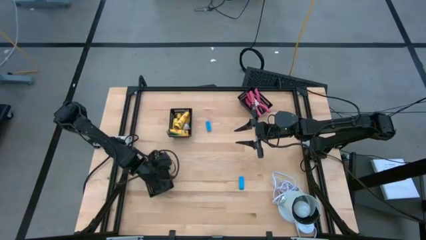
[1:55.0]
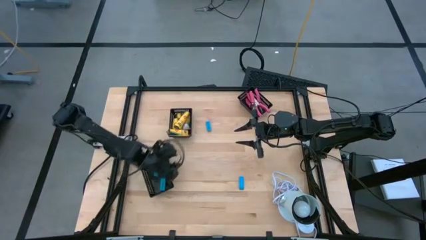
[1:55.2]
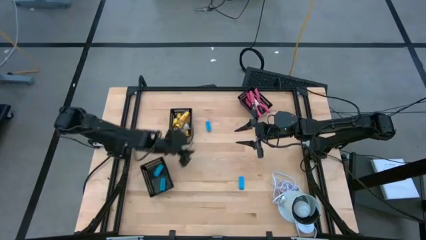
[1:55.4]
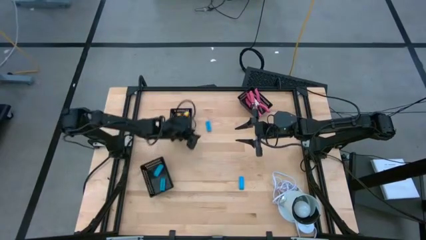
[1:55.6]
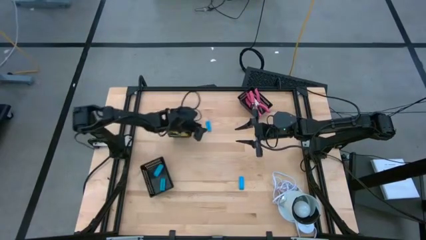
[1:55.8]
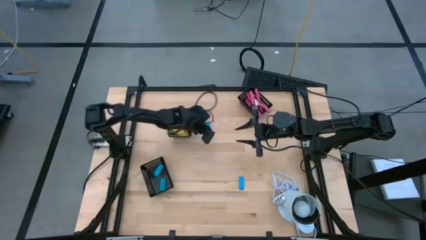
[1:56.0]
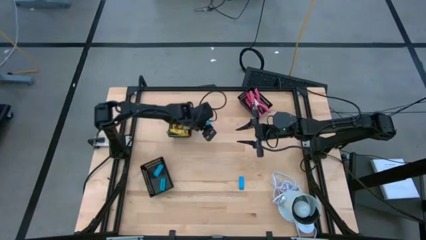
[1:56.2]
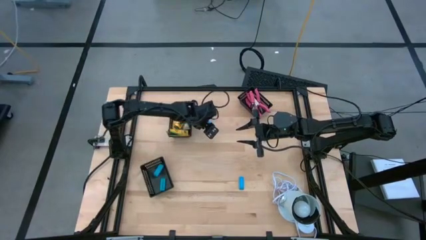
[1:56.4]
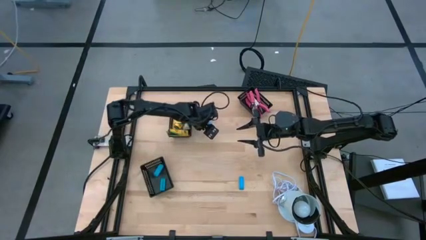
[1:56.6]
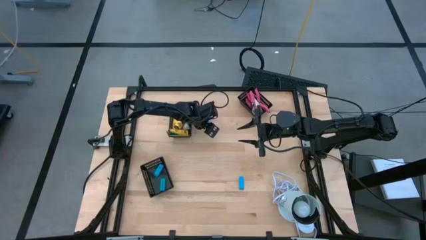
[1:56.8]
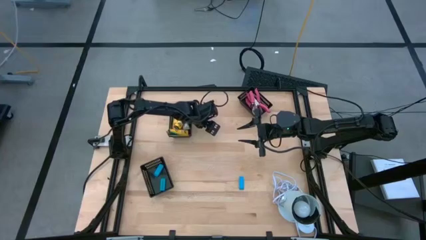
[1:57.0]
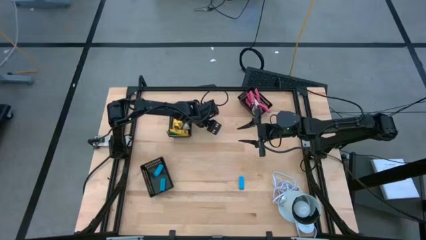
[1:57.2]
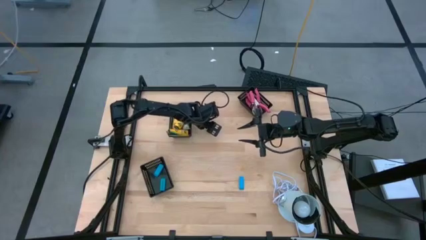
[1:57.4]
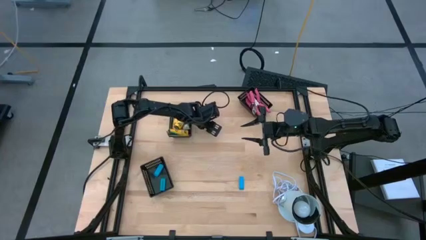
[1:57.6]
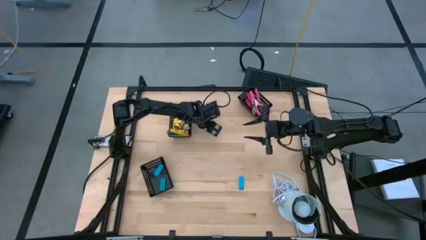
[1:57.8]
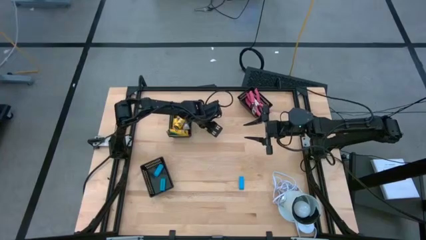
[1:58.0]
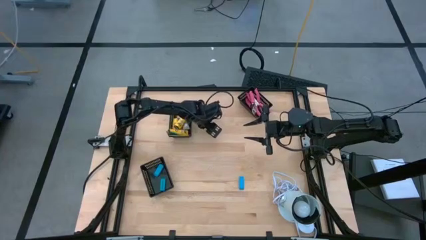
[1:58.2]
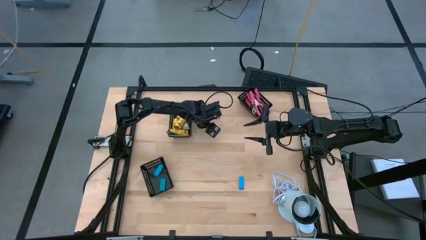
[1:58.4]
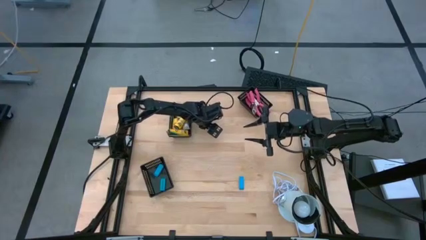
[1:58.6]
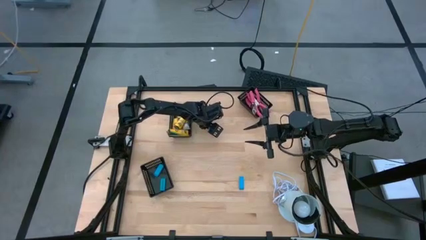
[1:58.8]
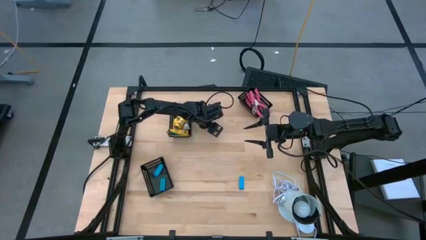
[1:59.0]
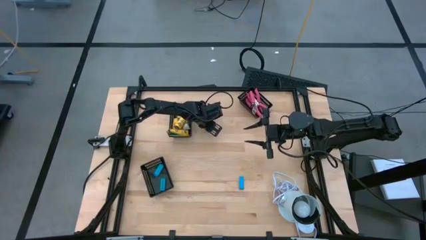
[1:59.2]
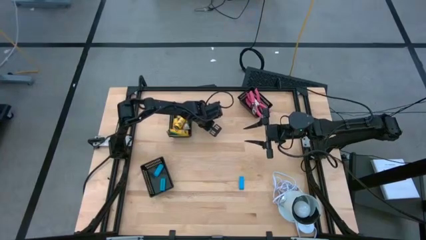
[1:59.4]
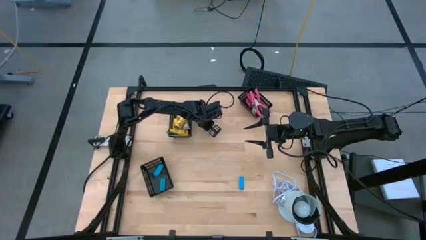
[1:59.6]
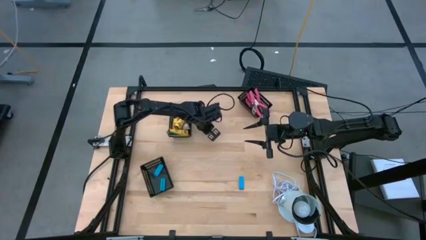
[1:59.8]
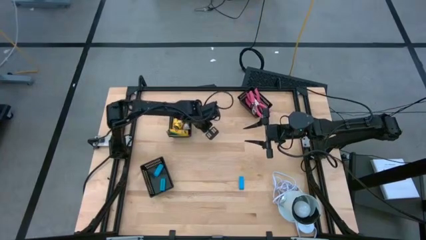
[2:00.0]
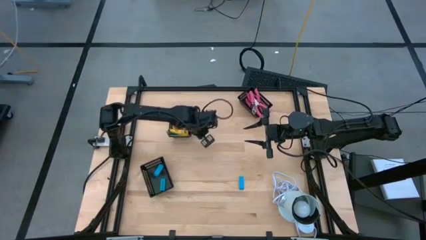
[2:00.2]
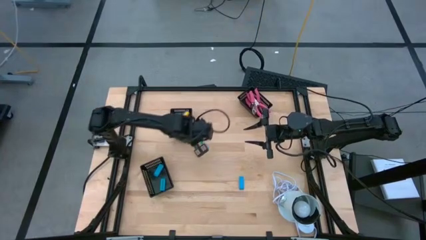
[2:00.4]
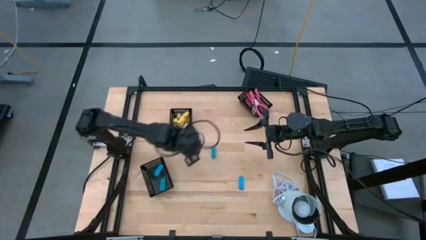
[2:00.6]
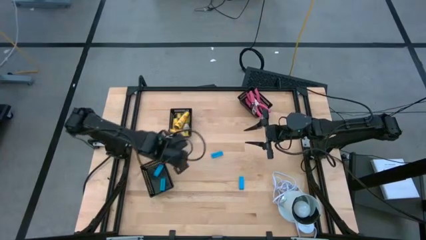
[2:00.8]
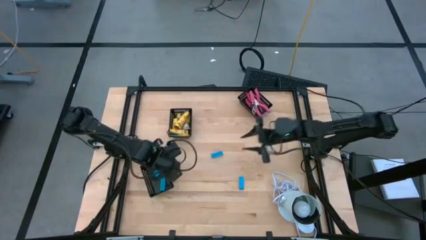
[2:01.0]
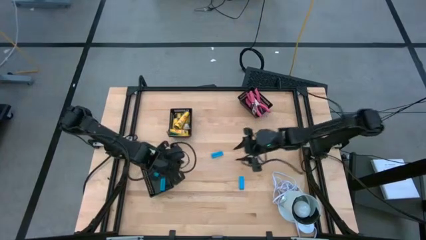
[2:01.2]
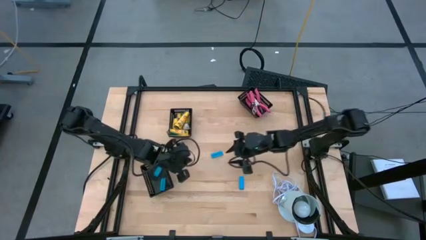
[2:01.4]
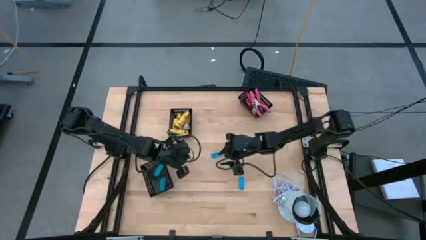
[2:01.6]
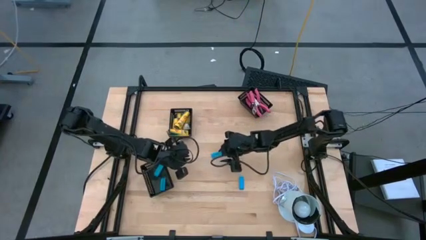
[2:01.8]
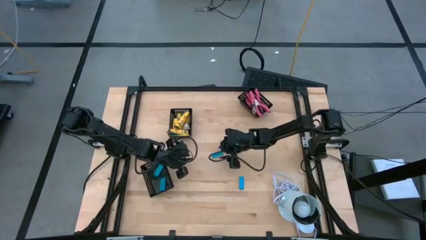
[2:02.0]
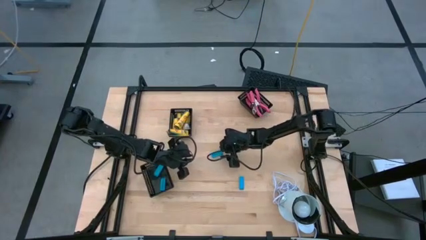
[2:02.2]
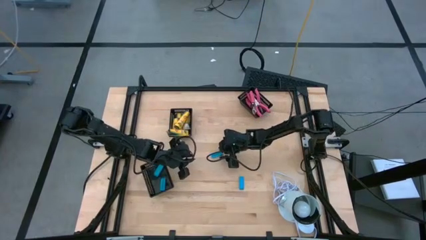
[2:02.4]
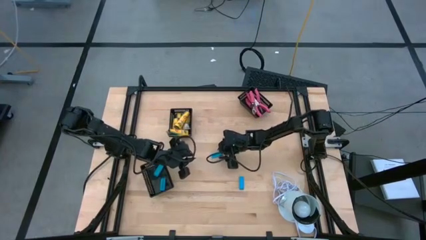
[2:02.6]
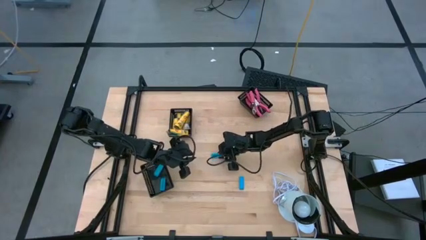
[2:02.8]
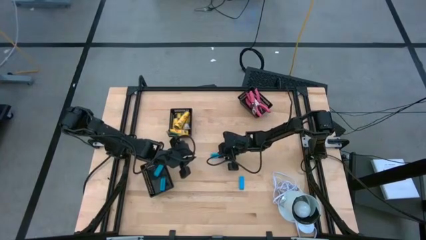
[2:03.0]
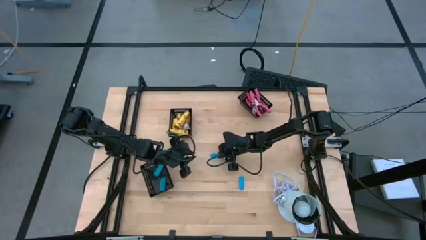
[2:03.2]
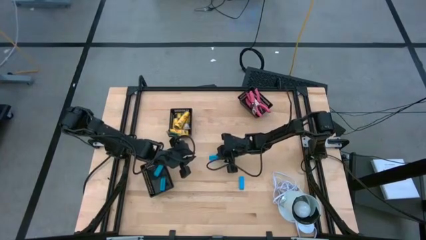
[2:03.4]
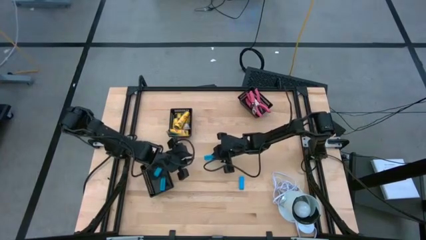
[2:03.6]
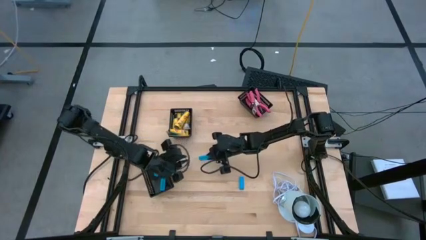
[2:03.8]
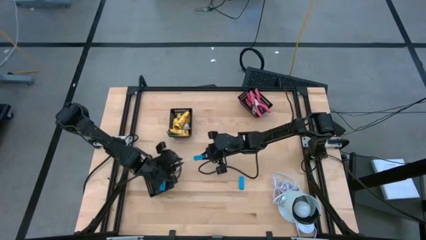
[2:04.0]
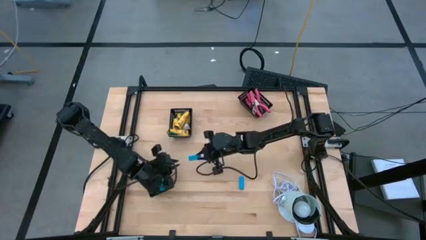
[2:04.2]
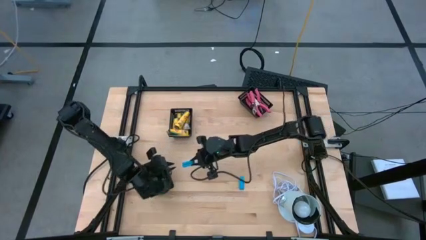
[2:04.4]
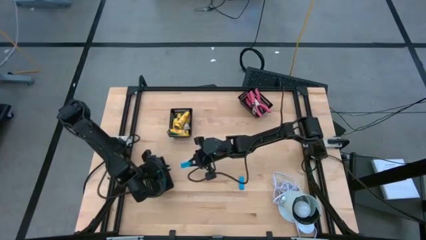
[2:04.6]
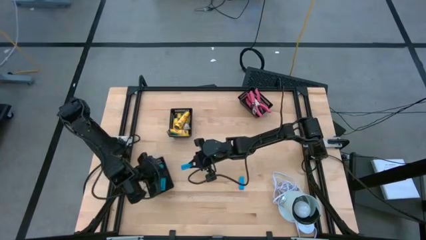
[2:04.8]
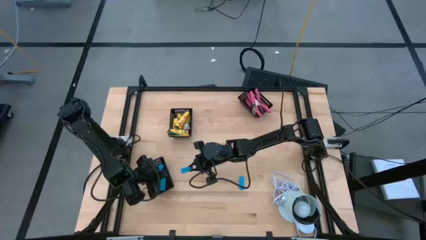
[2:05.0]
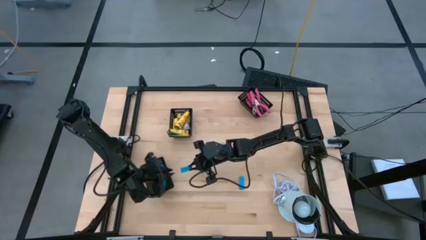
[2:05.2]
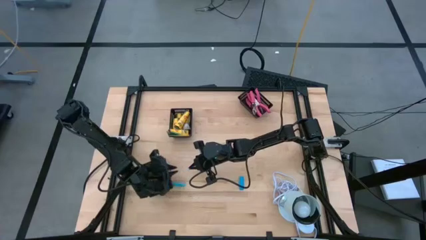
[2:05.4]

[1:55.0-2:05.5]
Task: Pick & Place School Supplies
Put the blue eraser into the bottom black bin

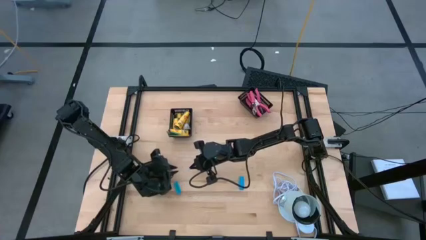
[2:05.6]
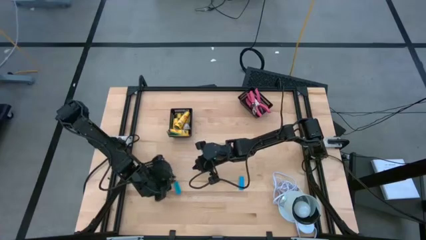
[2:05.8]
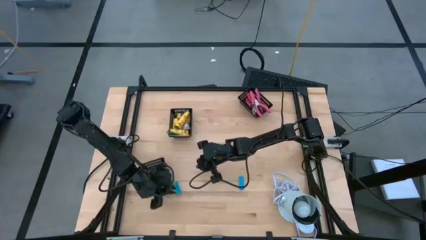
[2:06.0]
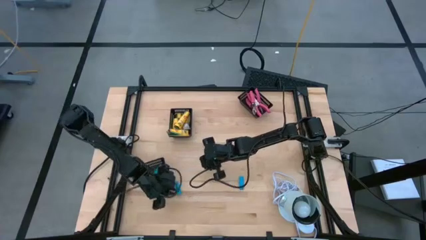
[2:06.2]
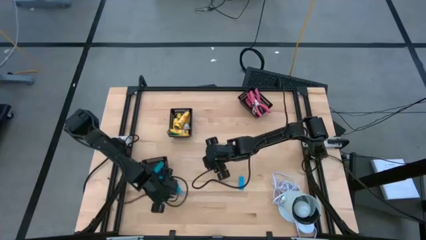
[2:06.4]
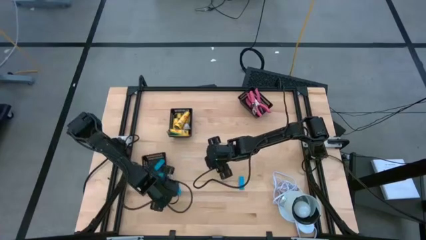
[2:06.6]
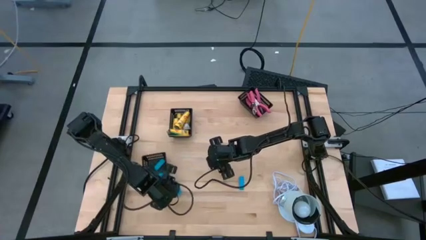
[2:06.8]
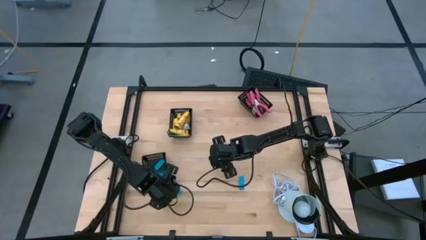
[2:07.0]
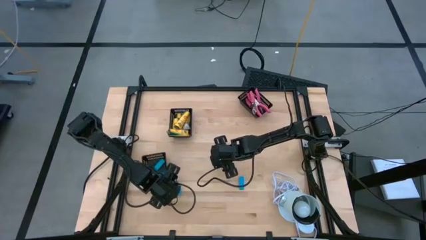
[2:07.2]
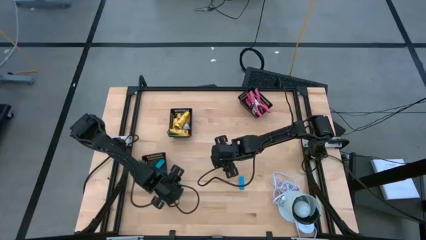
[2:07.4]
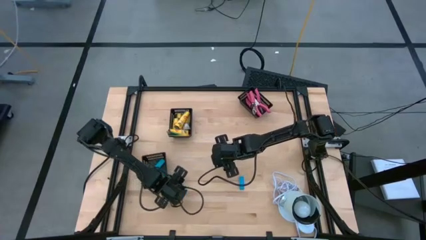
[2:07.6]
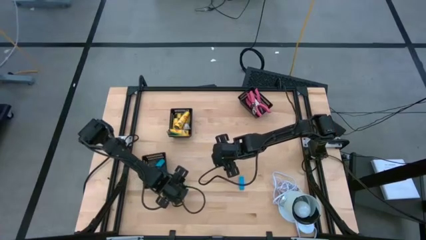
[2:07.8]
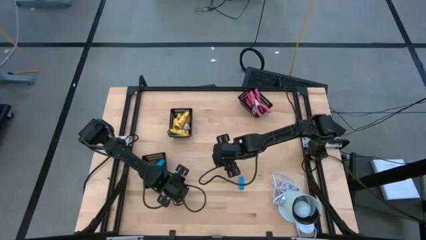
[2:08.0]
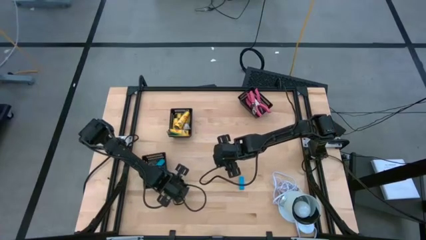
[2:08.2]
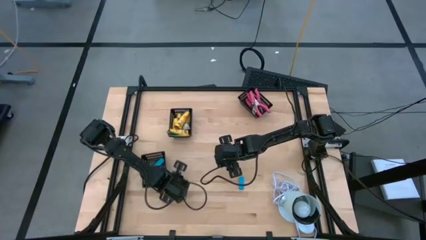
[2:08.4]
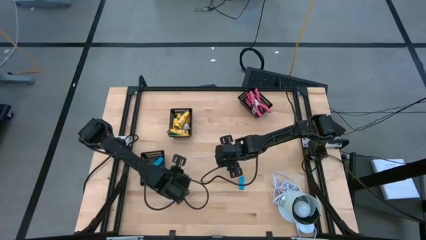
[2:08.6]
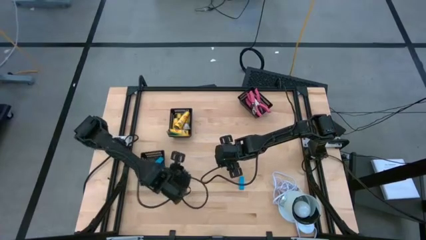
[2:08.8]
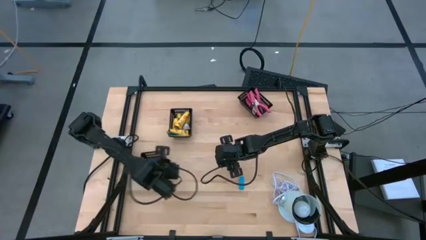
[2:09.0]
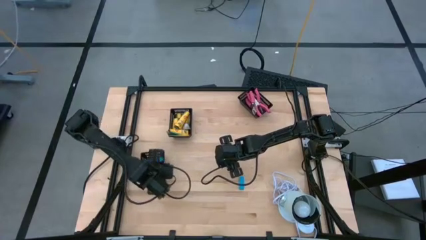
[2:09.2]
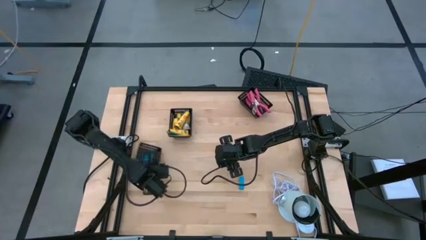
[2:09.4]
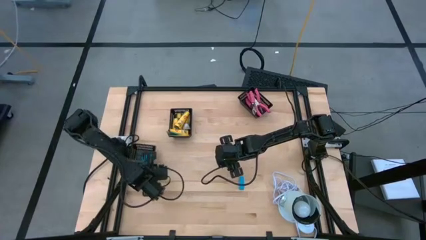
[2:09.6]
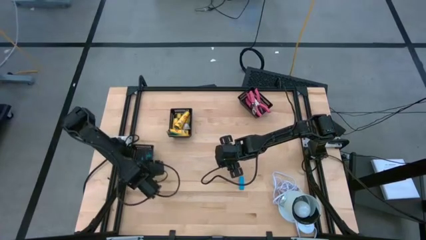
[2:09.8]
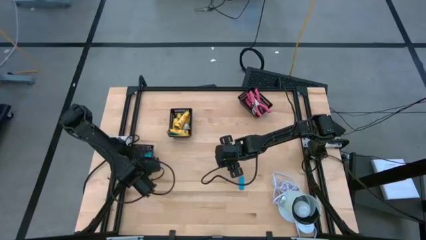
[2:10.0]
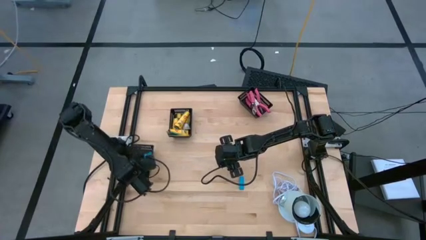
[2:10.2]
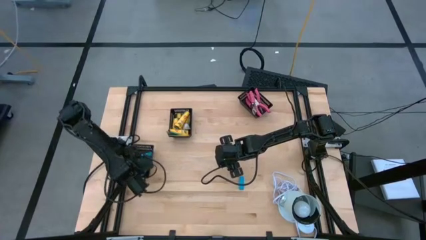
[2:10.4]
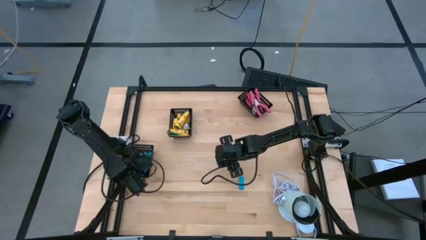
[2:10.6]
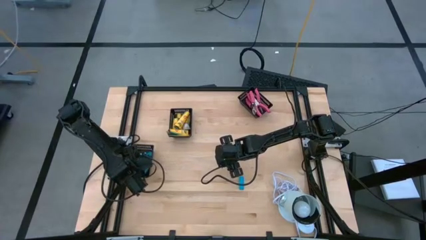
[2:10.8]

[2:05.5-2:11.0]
Put the blue eraser into the bottom black bin

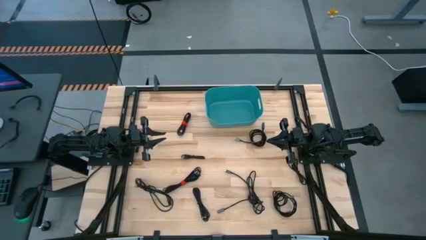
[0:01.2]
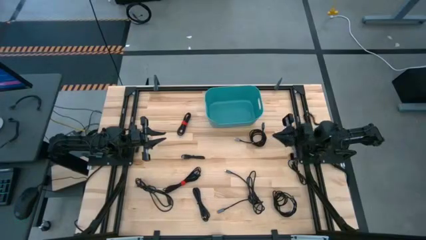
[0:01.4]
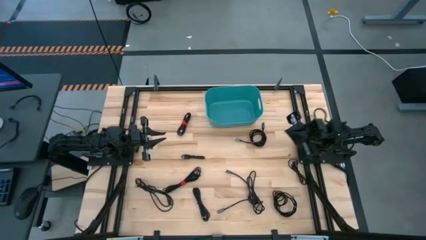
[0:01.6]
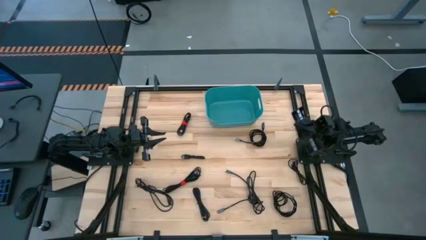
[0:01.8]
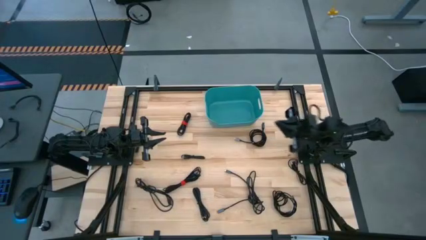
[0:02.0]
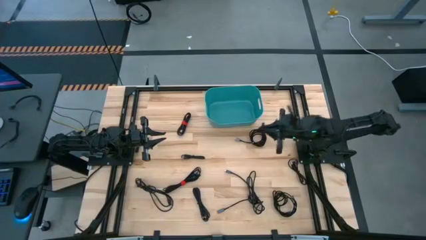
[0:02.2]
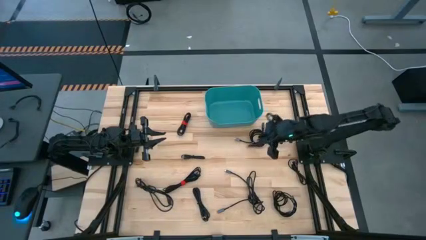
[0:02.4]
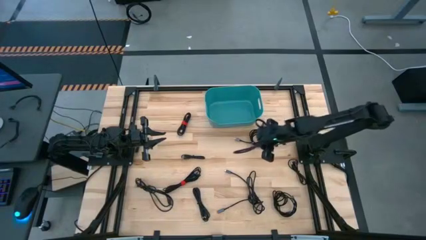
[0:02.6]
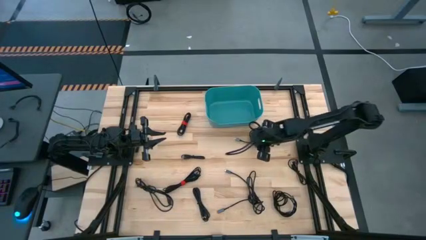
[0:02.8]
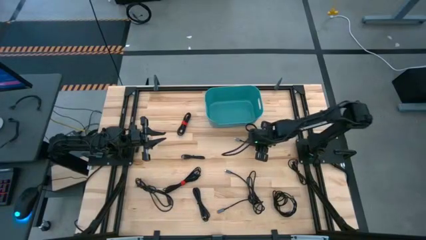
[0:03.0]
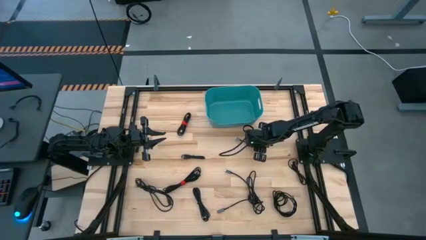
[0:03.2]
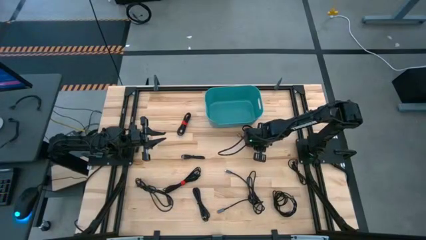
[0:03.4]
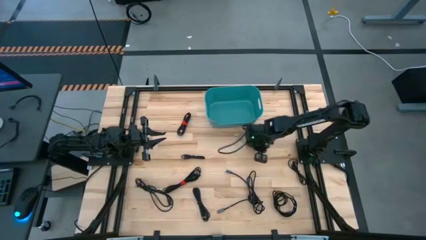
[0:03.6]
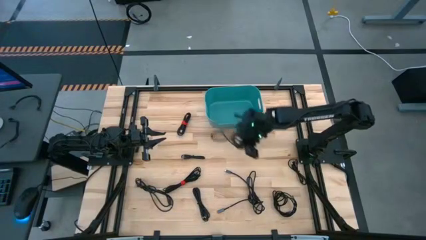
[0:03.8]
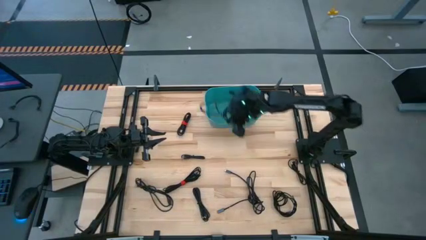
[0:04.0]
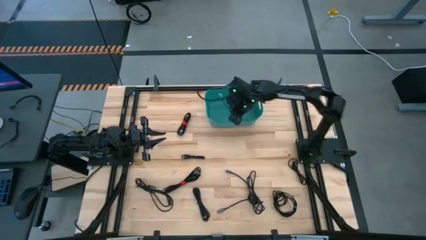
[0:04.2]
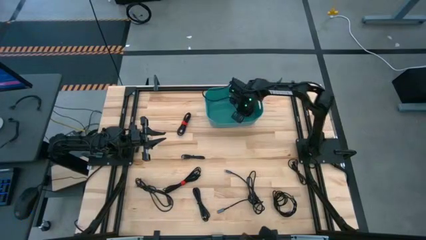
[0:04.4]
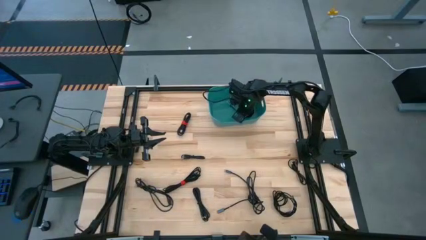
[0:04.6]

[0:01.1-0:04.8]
Task: Pick and place USB-C Cables
Put the black charger cable into the blue bin
